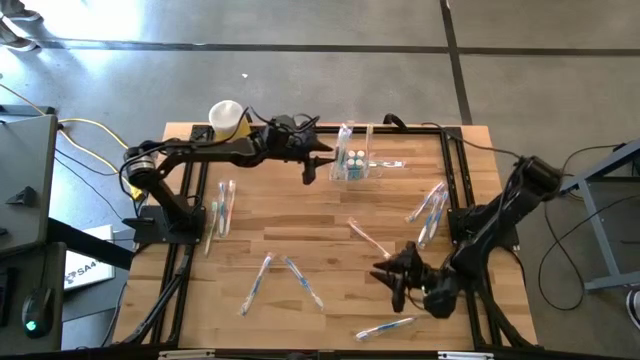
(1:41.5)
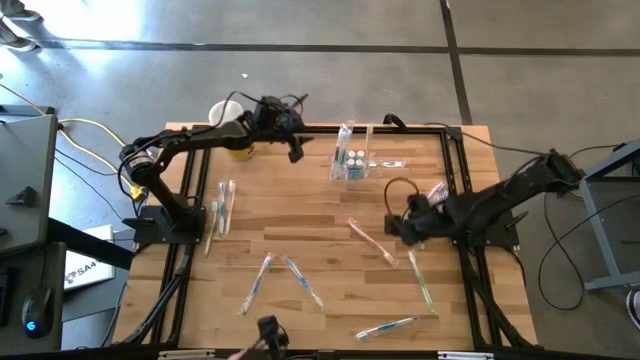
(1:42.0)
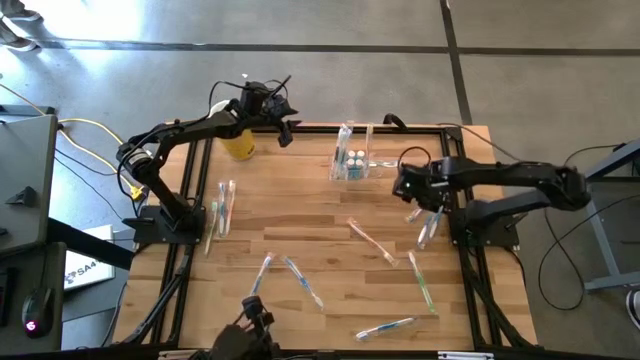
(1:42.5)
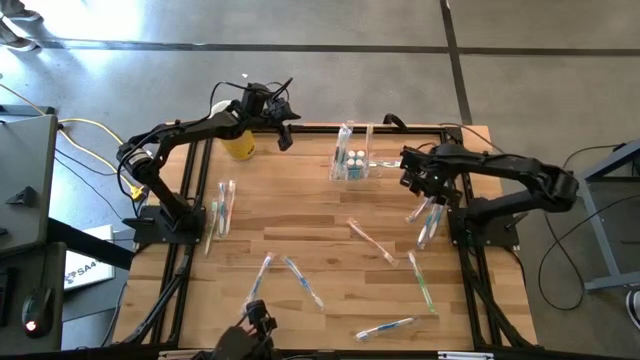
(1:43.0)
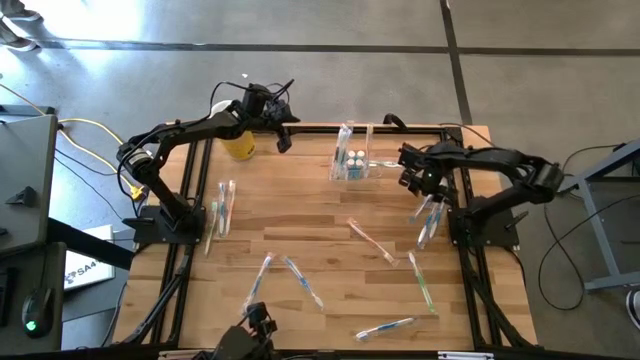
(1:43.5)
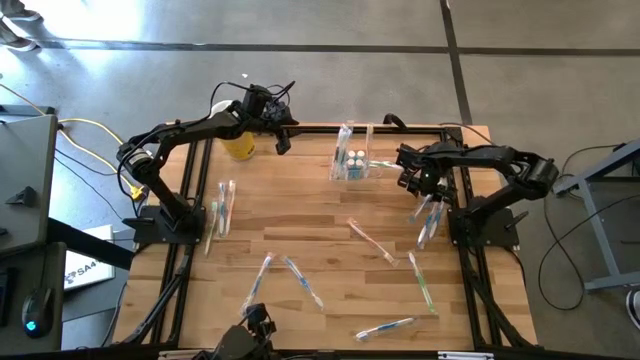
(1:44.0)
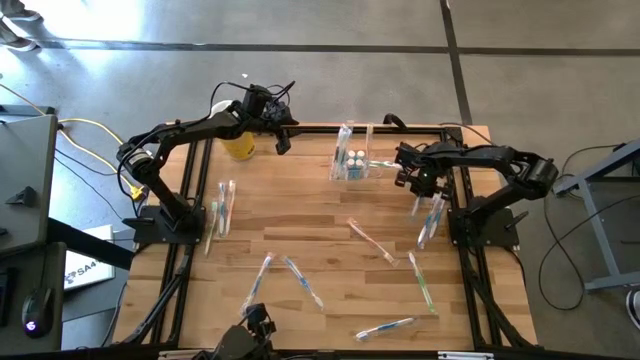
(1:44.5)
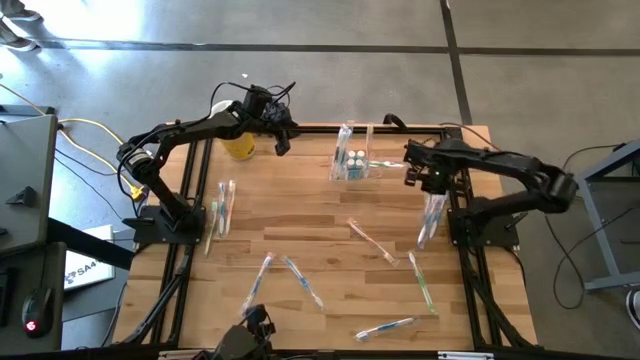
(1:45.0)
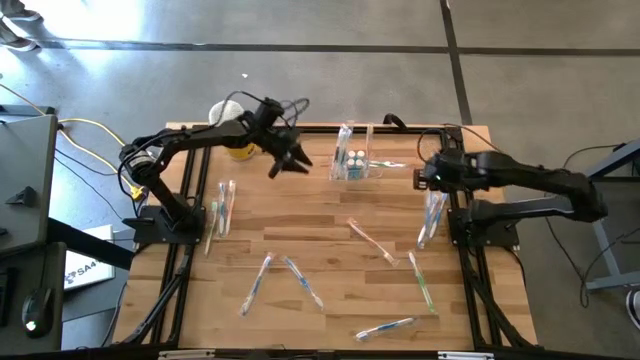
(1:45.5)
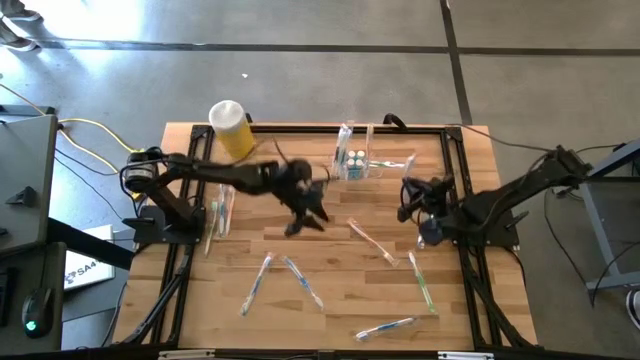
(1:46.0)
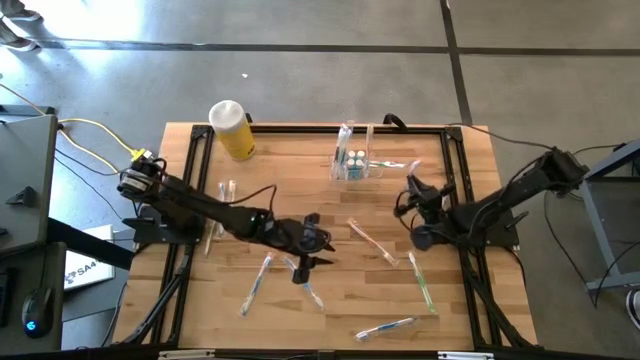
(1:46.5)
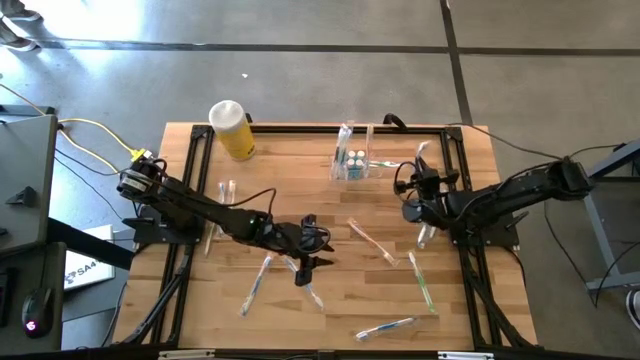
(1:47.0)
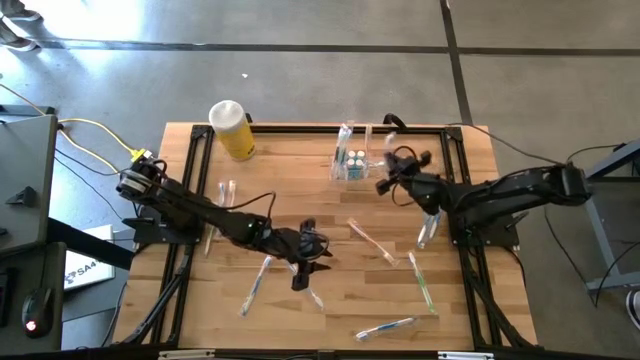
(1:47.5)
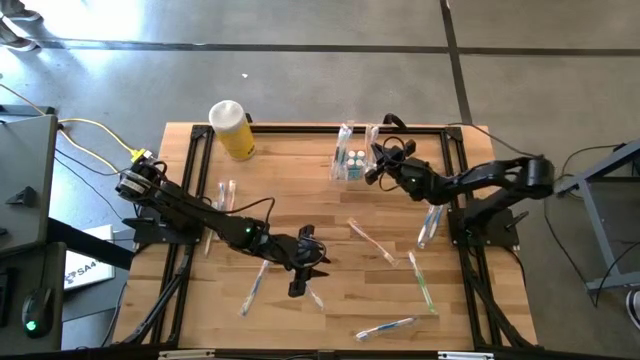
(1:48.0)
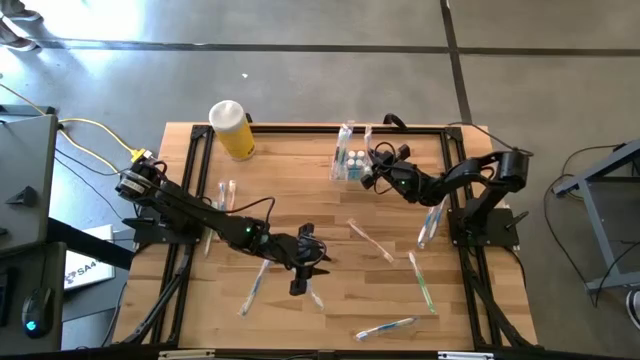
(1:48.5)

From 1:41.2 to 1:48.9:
Task: Pick & Place toothbrushing station
Put the blue toothbrush into the transparent organizer

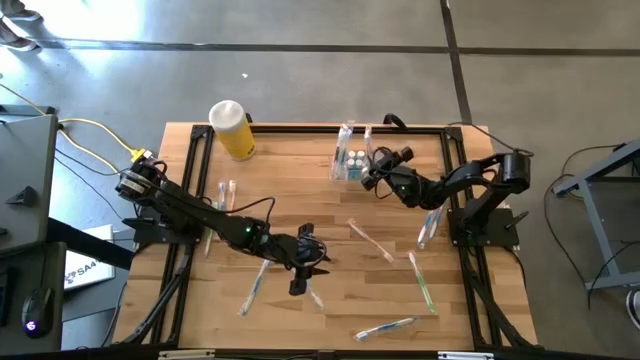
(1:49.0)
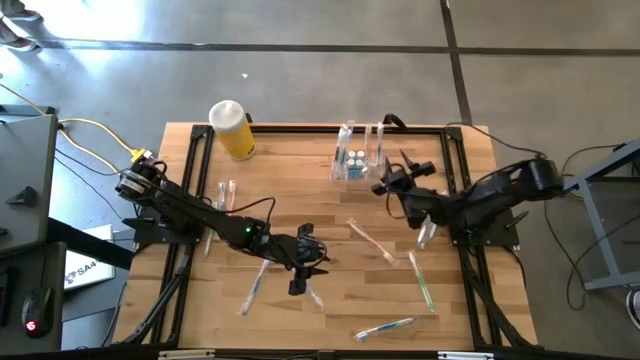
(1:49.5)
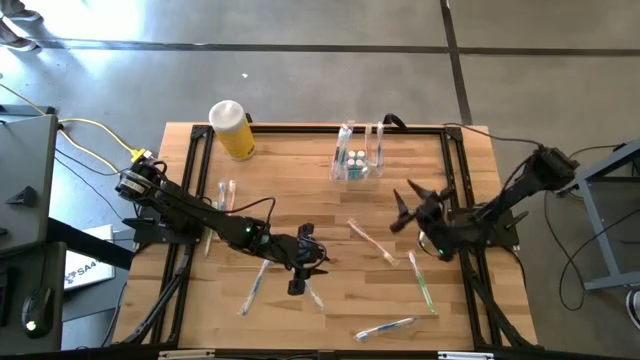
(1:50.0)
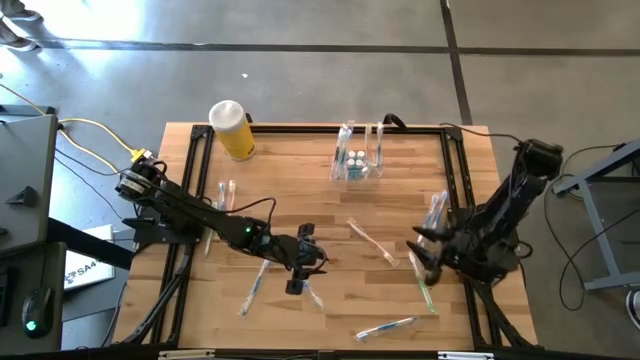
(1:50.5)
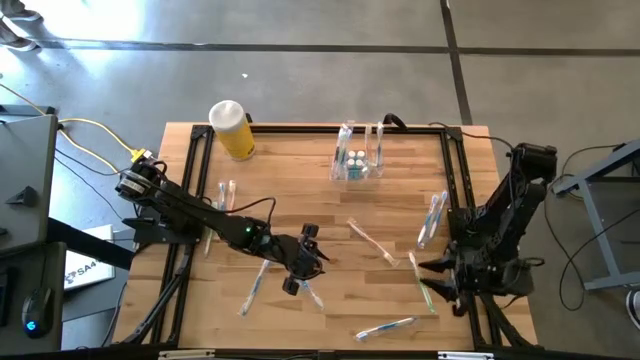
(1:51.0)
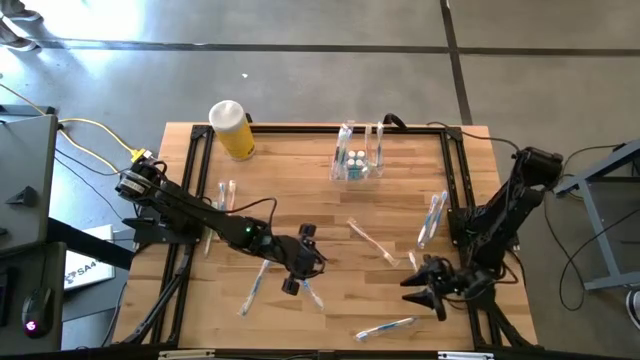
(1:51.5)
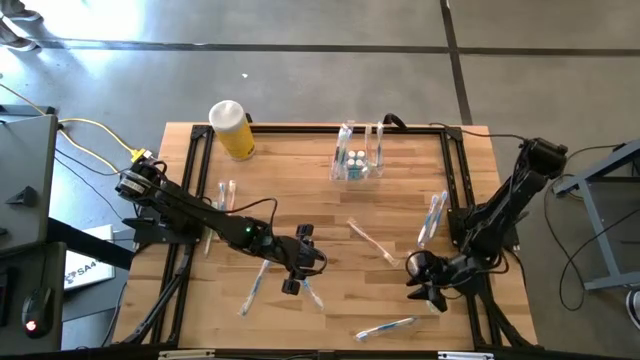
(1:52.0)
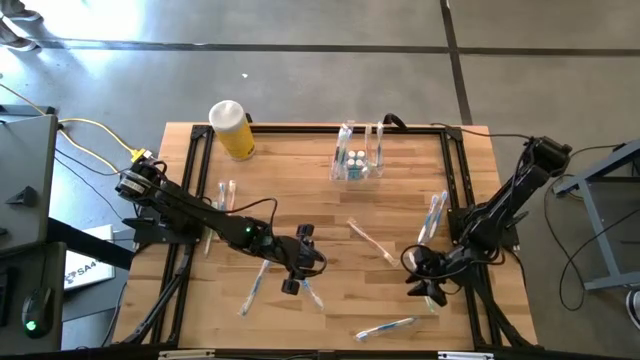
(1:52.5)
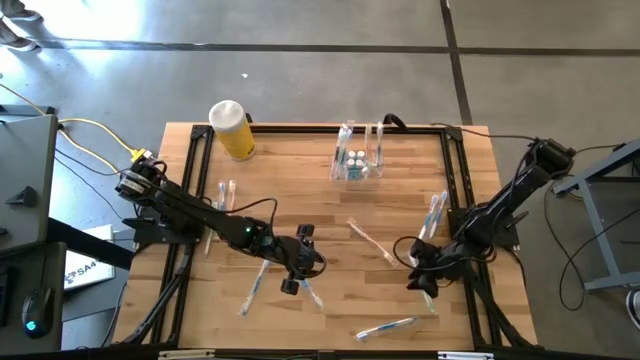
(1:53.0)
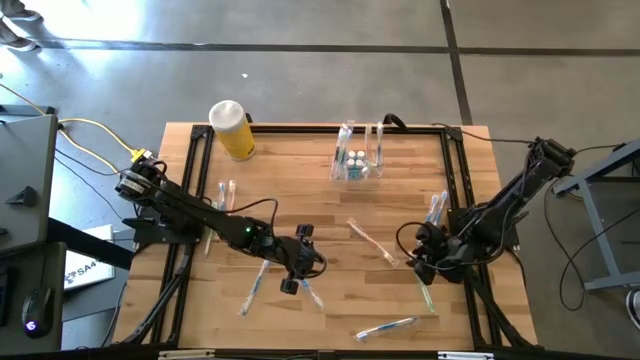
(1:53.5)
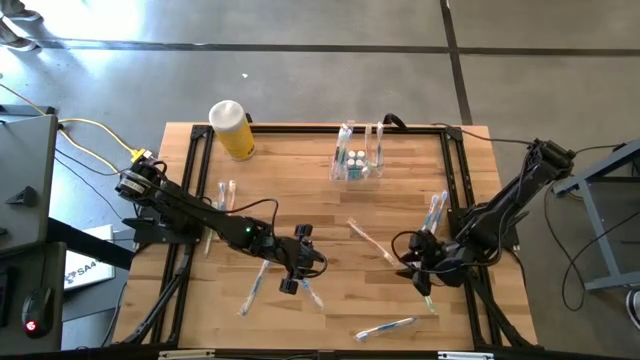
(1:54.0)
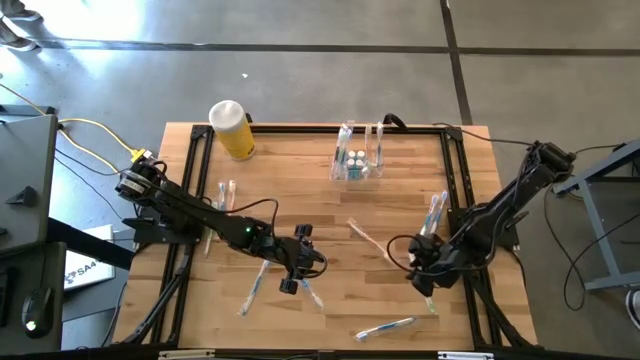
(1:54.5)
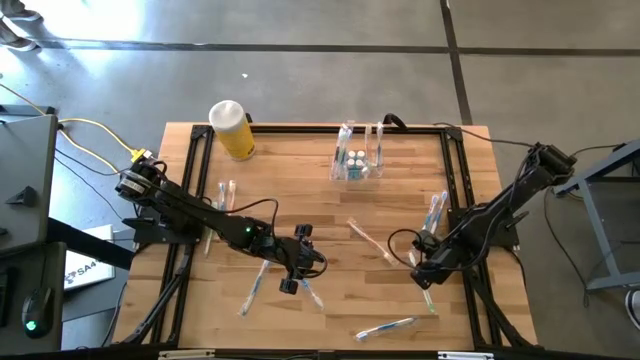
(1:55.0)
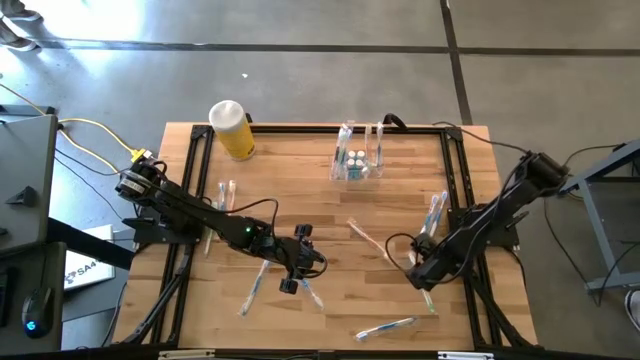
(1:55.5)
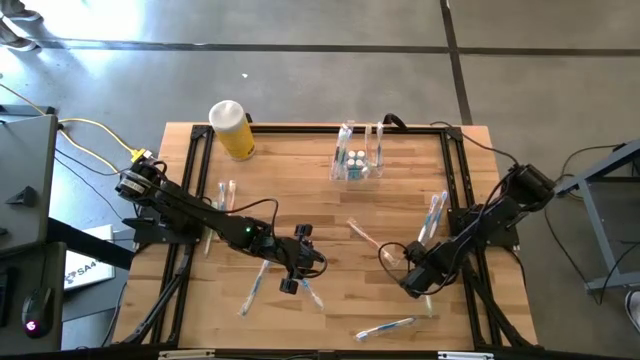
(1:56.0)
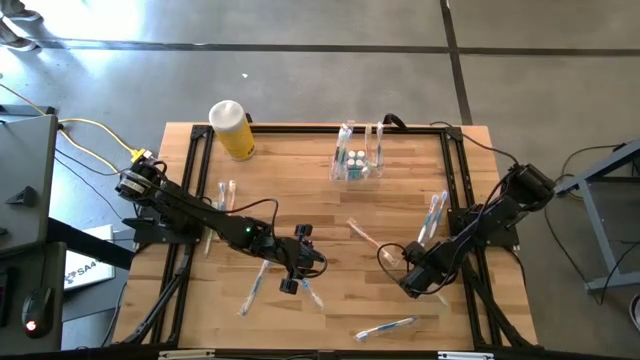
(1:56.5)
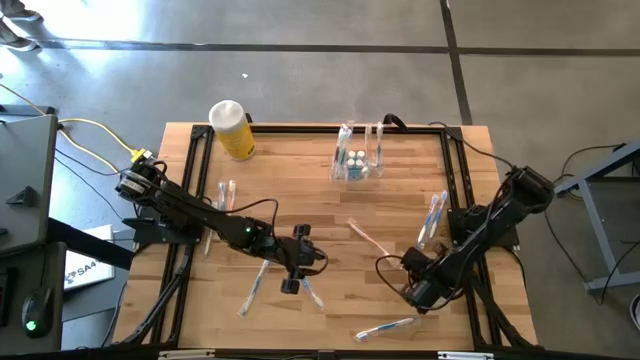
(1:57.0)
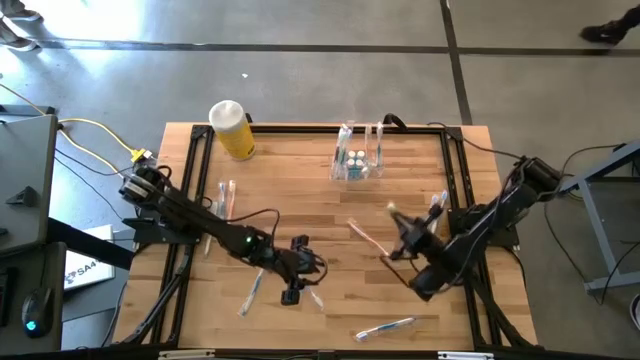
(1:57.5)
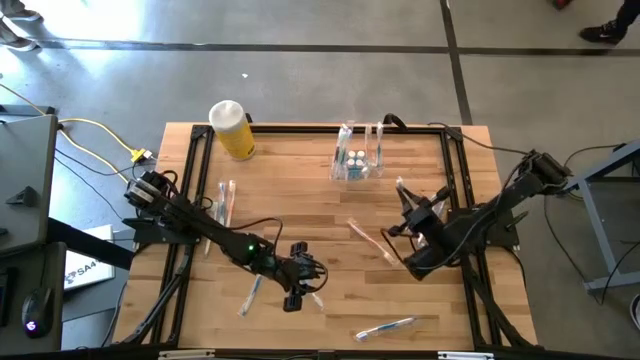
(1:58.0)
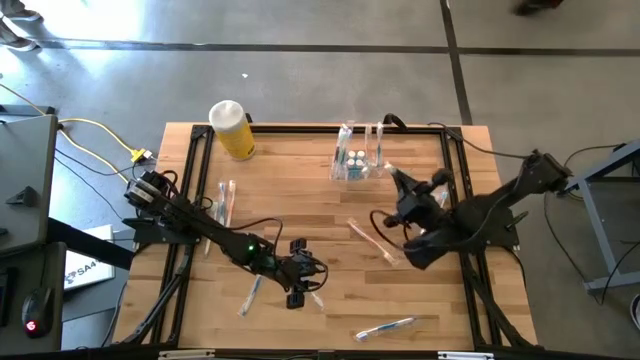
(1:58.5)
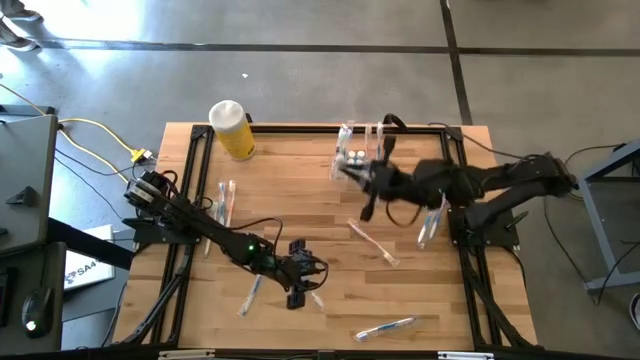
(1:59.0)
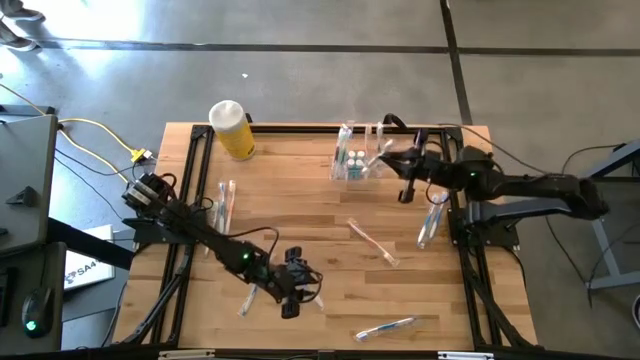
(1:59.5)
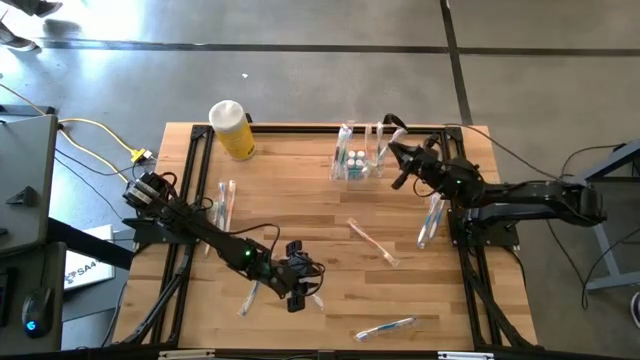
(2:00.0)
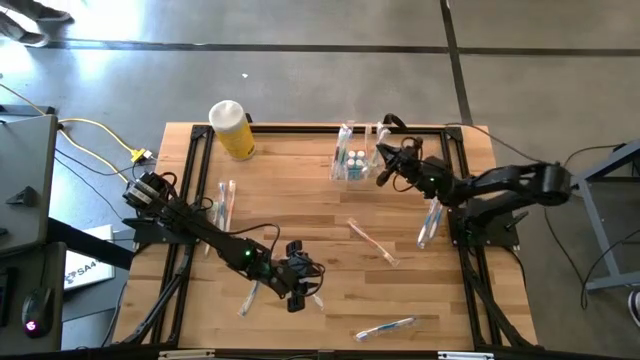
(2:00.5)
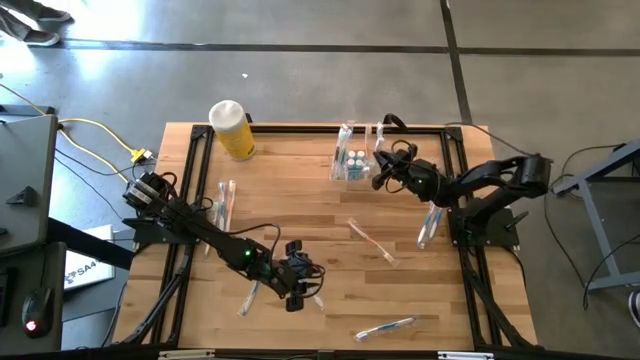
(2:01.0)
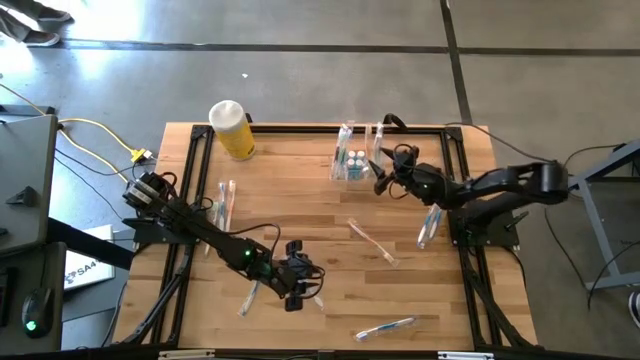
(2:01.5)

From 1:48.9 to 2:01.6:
Put the green toothbrush into the transparent organizer

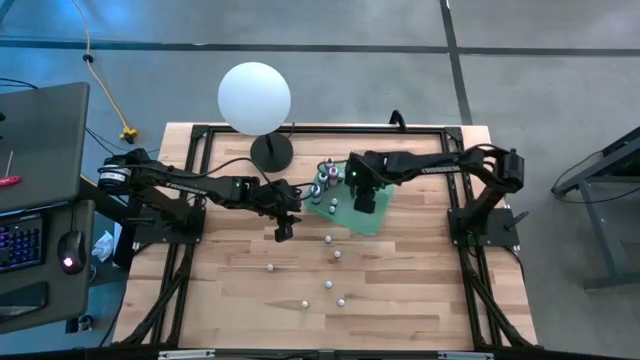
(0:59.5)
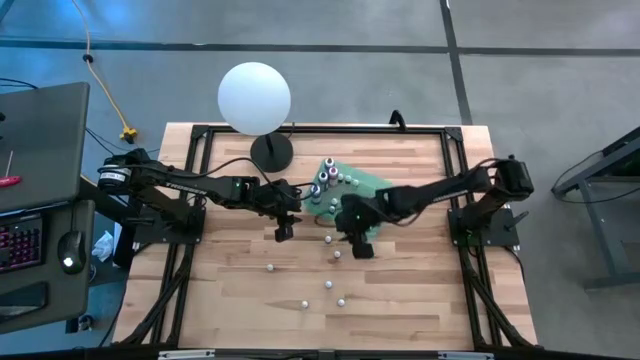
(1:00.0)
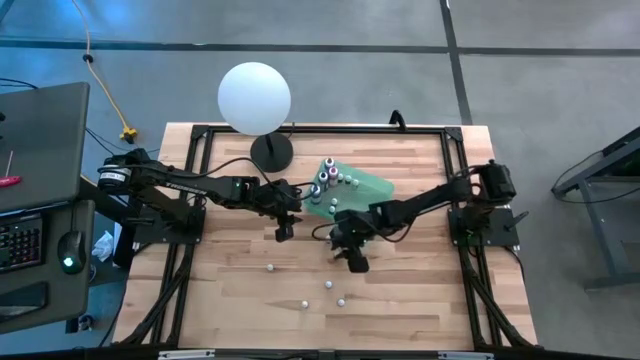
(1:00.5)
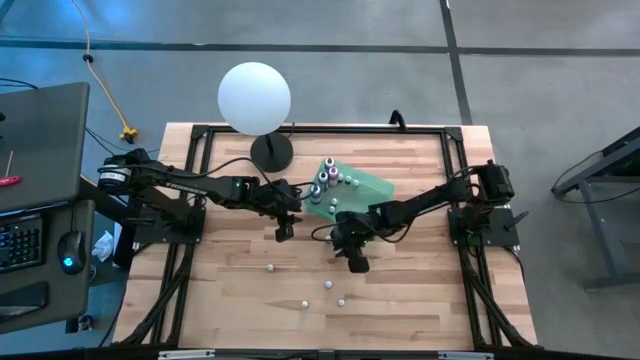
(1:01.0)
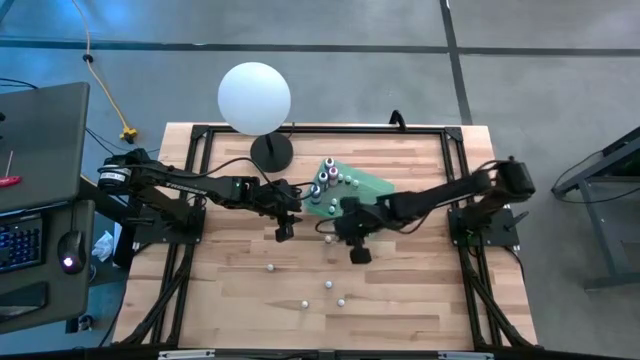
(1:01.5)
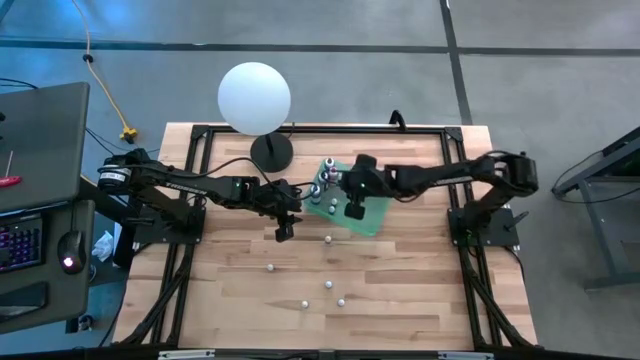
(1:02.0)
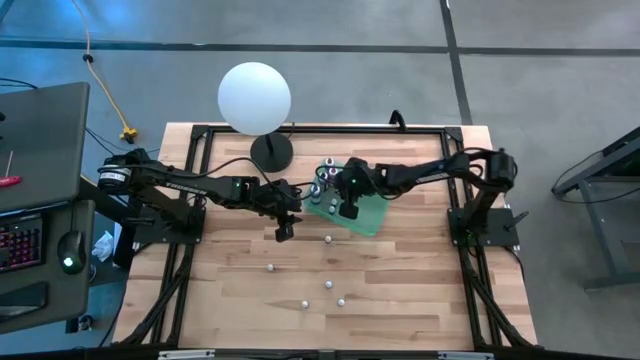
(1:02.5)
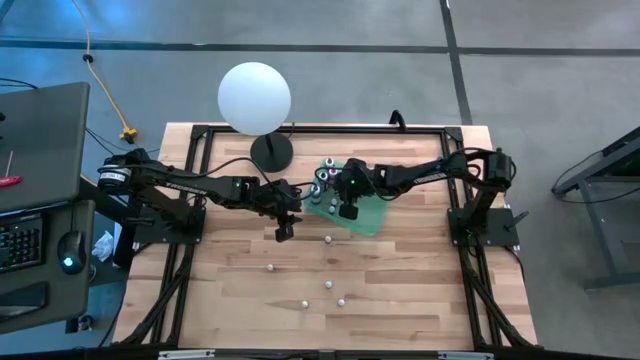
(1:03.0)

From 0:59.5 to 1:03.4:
Task: Pick & Place food coloring
Put the middle small purple food coloring bottle into the green container
